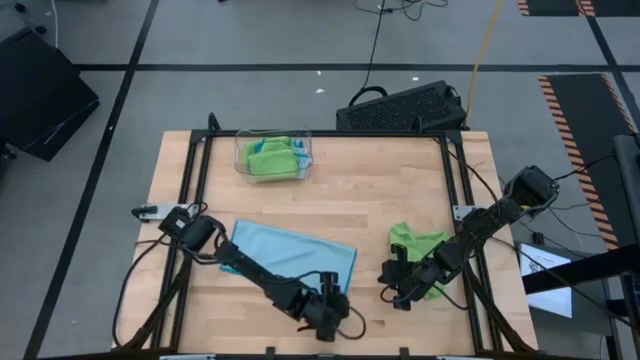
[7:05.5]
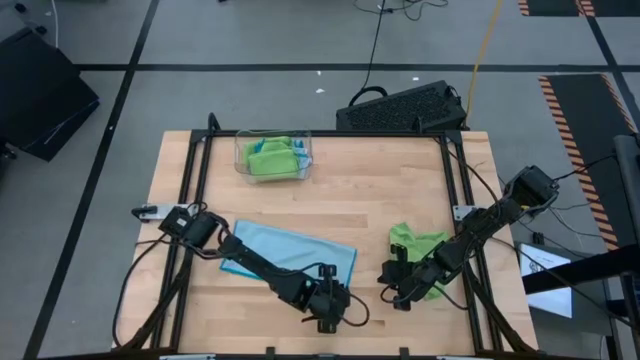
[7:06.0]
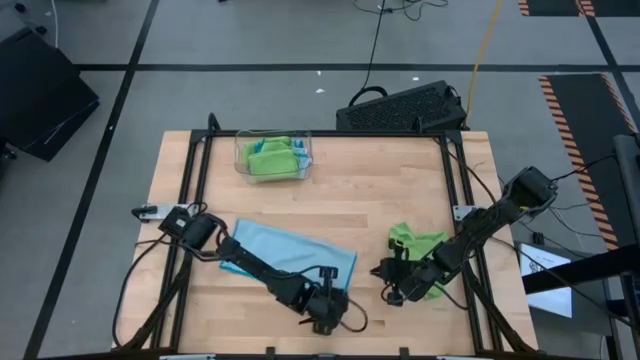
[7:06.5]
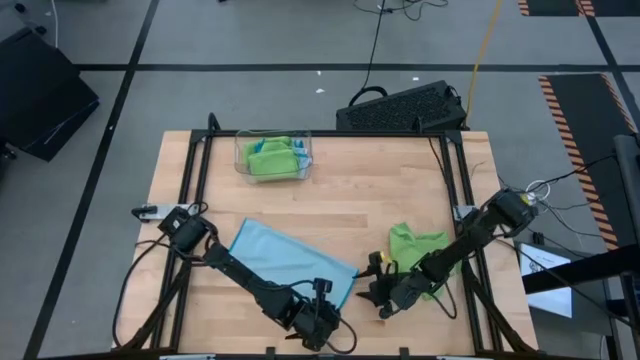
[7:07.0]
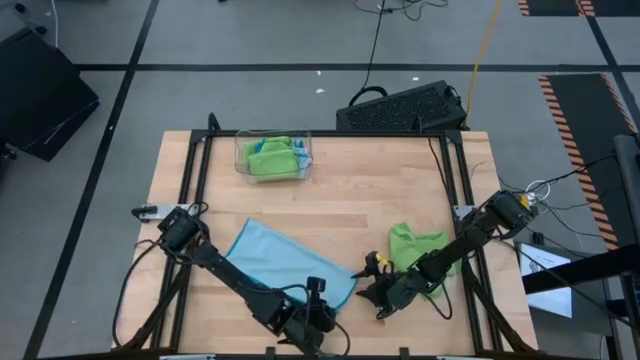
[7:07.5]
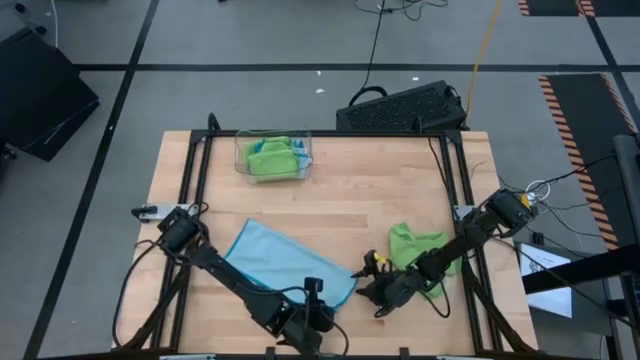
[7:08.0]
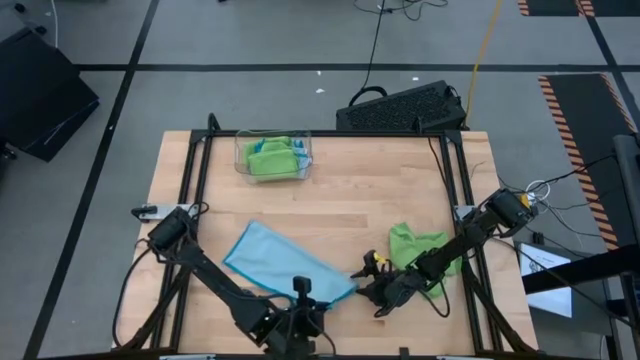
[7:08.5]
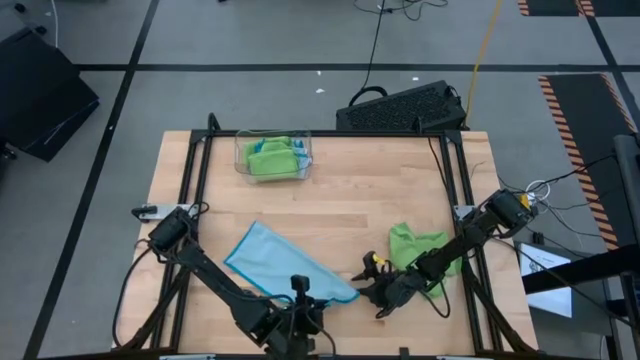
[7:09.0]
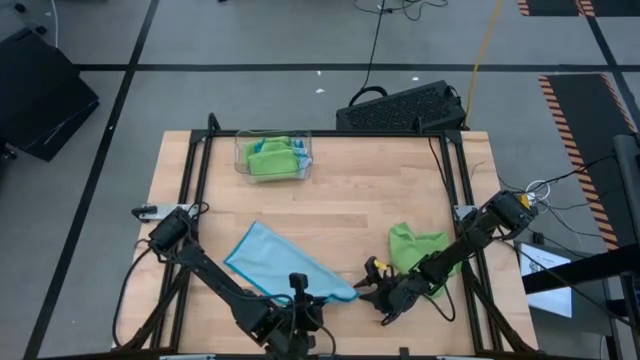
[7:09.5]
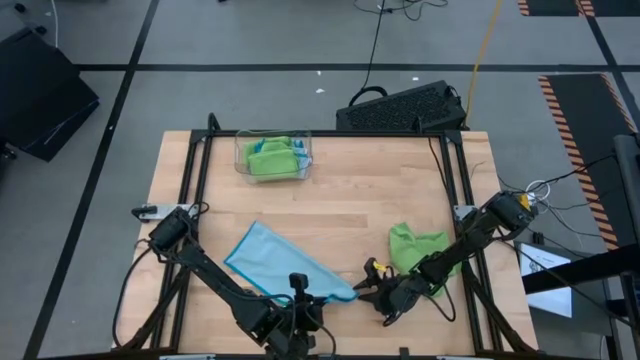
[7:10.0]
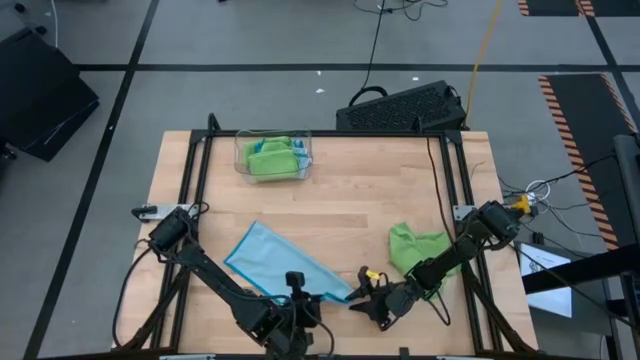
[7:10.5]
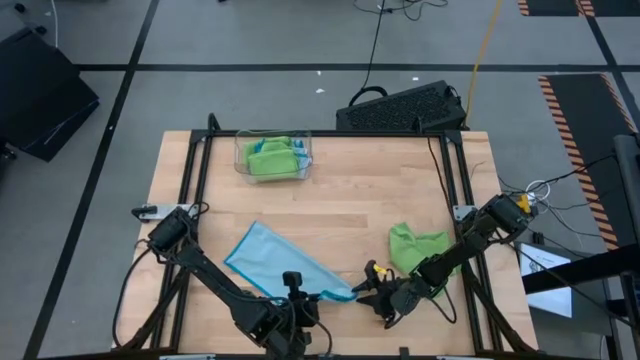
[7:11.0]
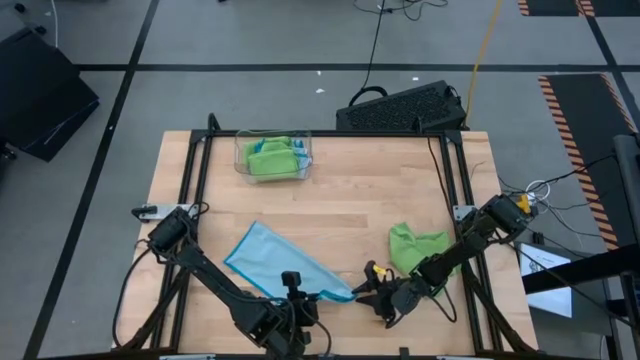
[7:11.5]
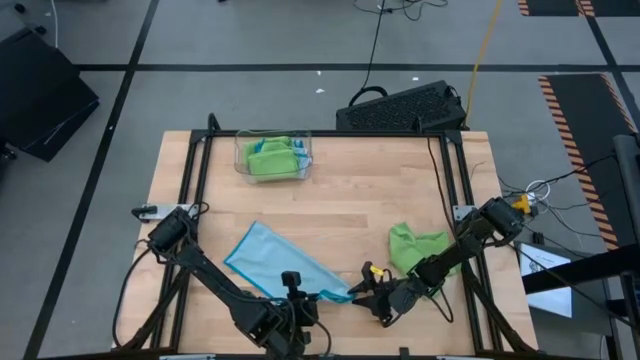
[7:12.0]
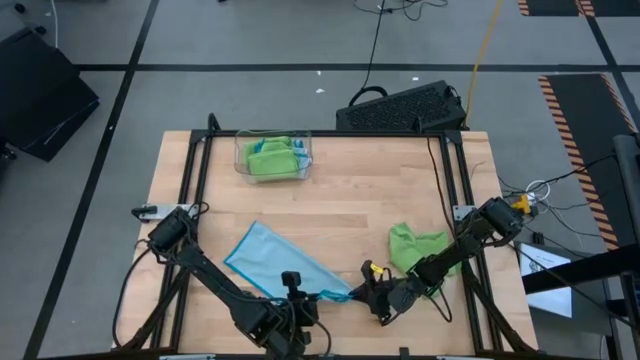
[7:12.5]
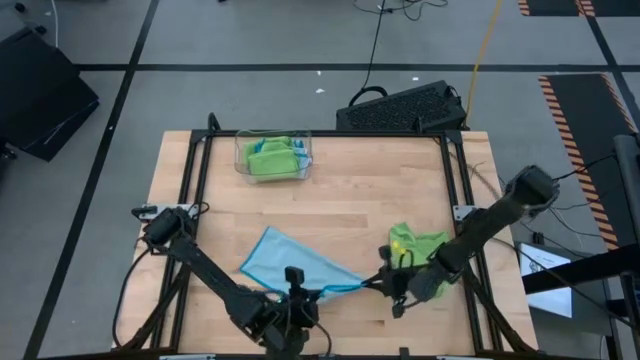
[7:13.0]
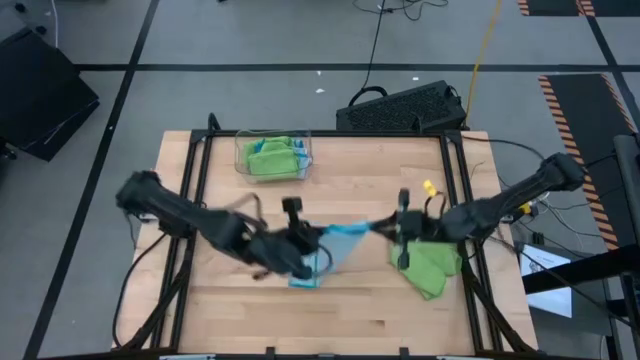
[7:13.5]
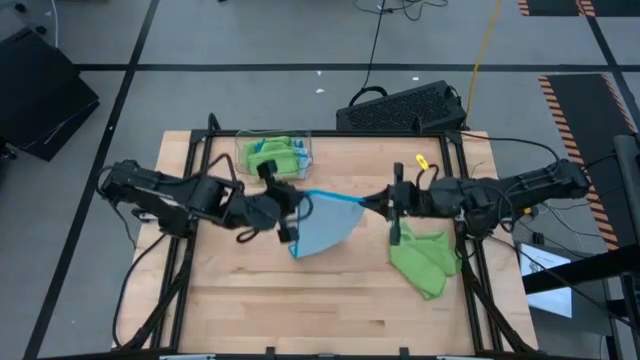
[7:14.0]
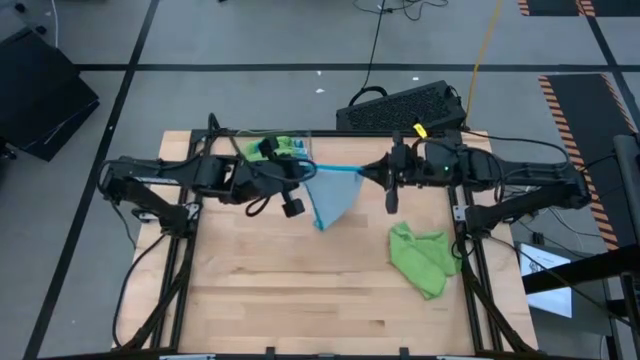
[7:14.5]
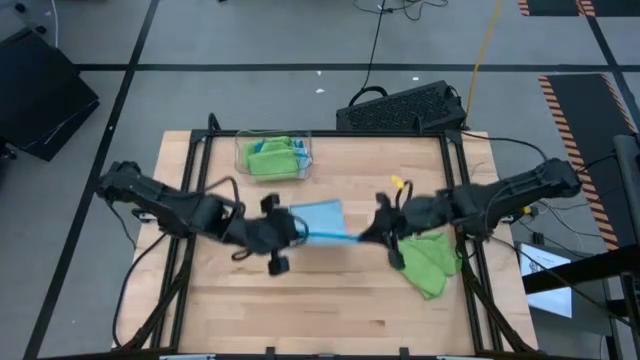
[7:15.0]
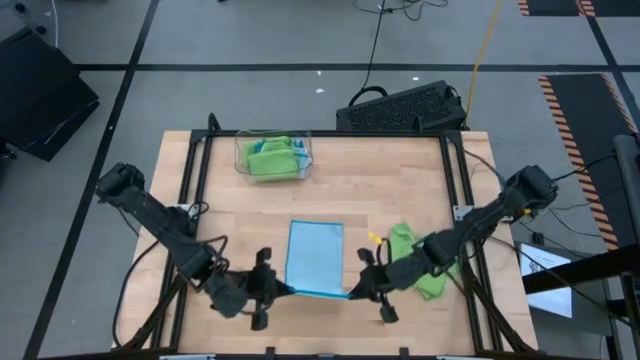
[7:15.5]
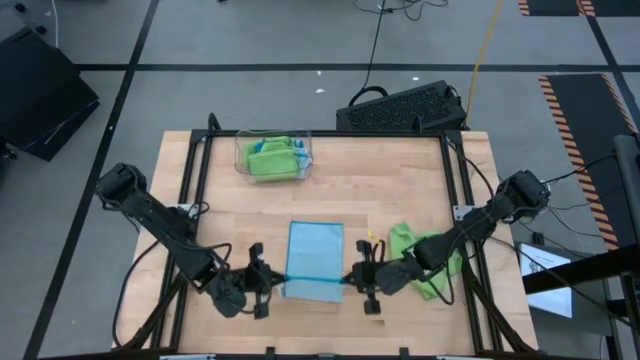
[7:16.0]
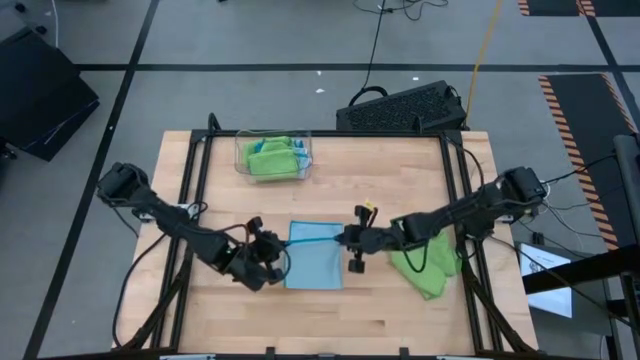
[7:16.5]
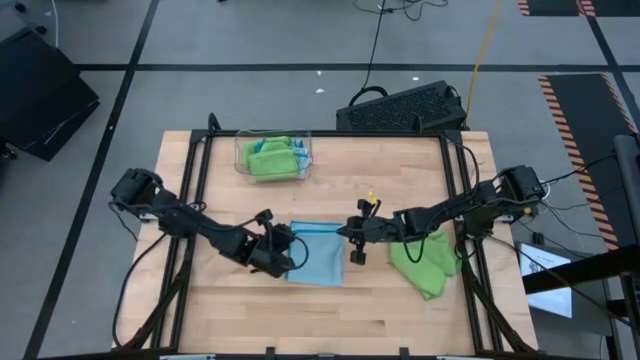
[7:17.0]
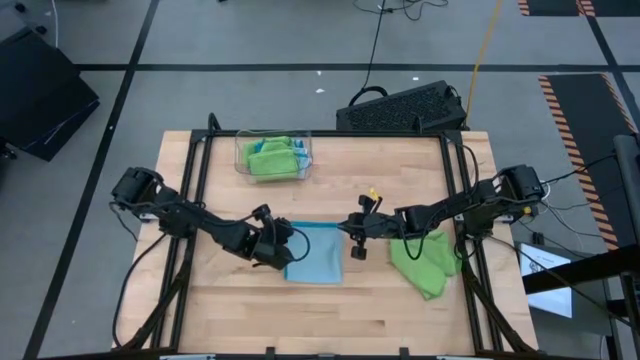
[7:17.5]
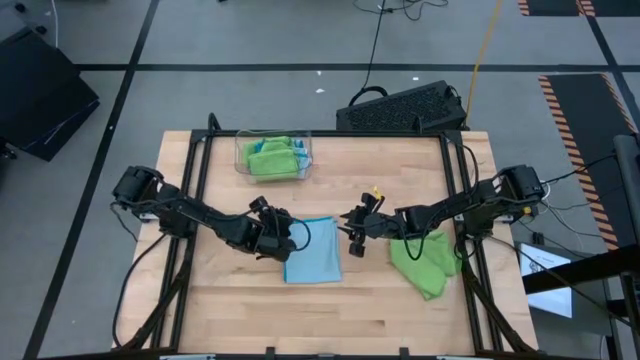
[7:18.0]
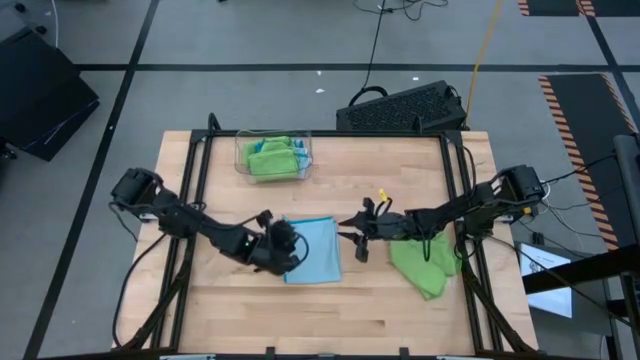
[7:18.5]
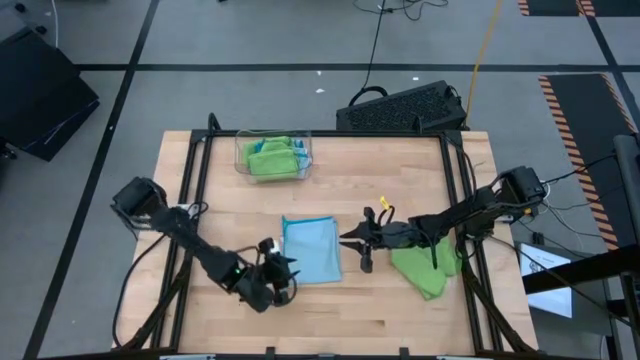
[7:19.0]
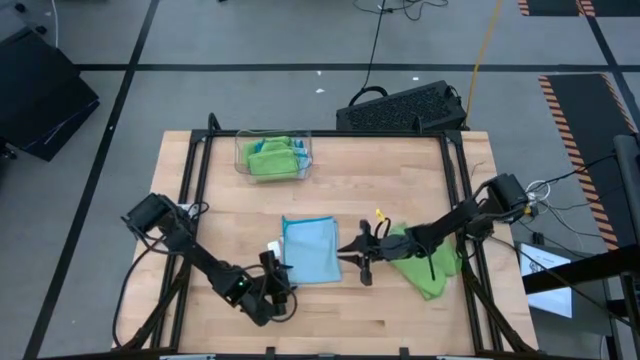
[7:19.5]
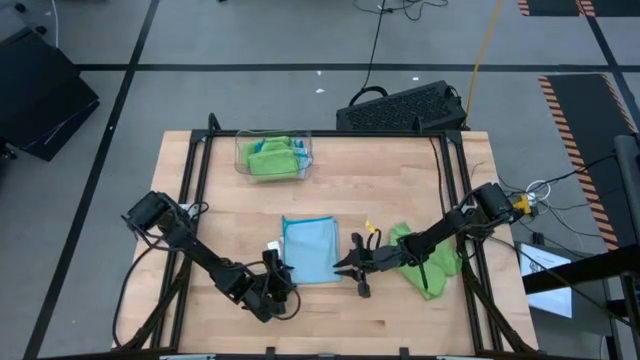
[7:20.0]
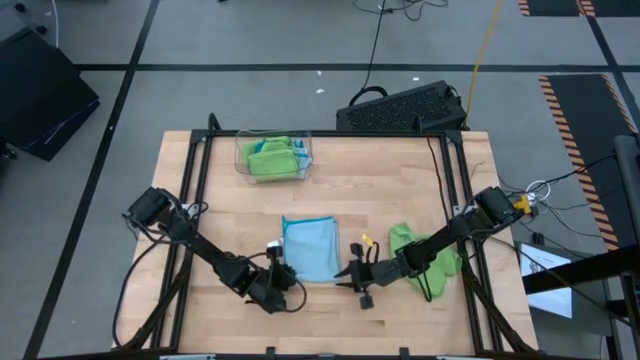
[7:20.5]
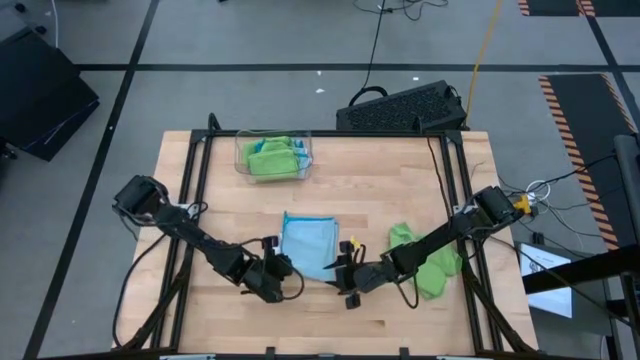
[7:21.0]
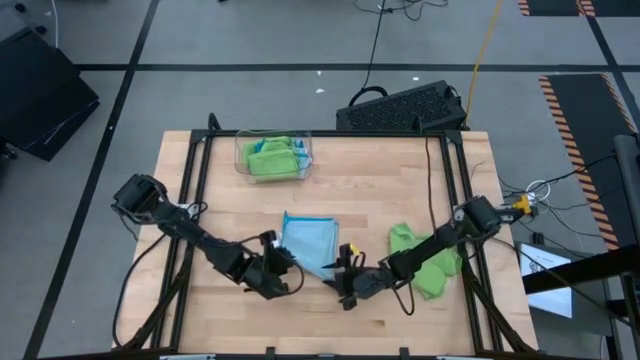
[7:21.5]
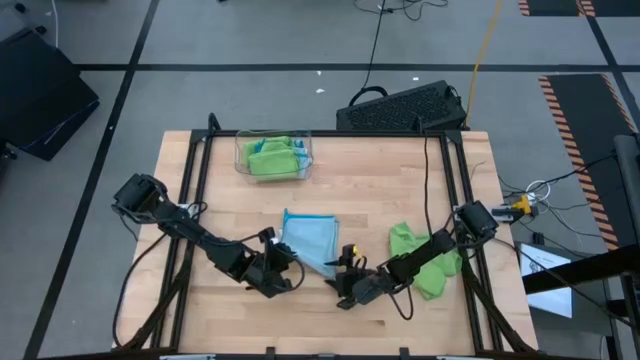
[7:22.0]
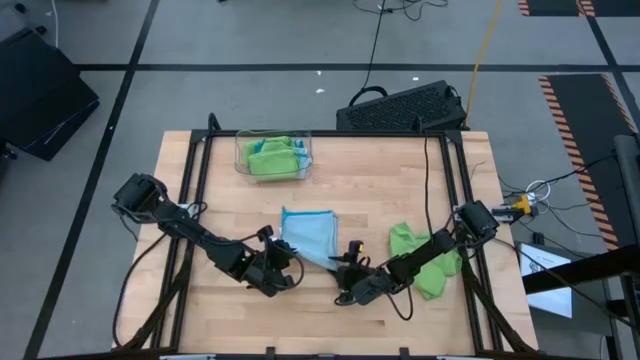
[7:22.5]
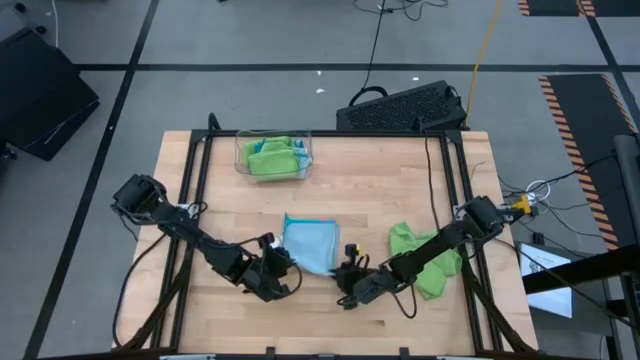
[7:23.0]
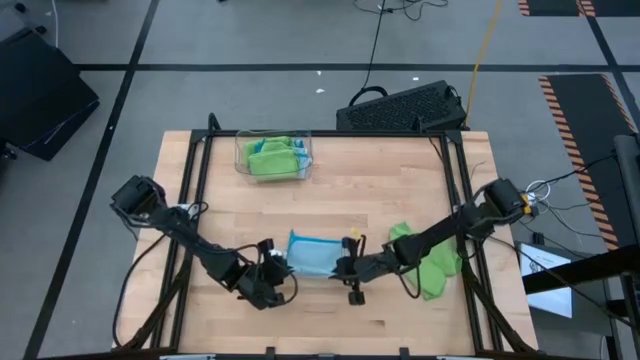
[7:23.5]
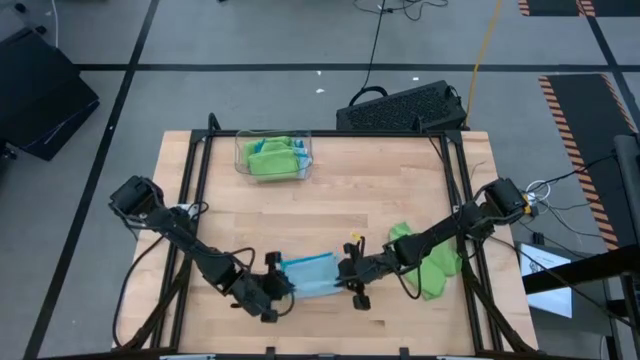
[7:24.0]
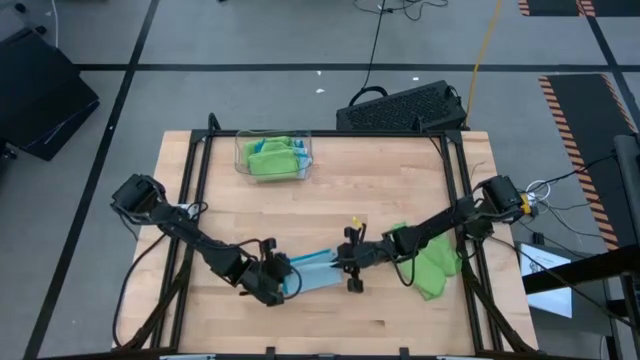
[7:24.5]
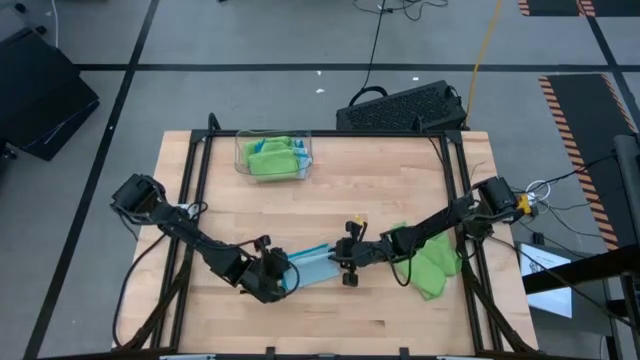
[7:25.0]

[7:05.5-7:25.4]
Task: Fold microfiber towels
Fold the blue microfiber cloth

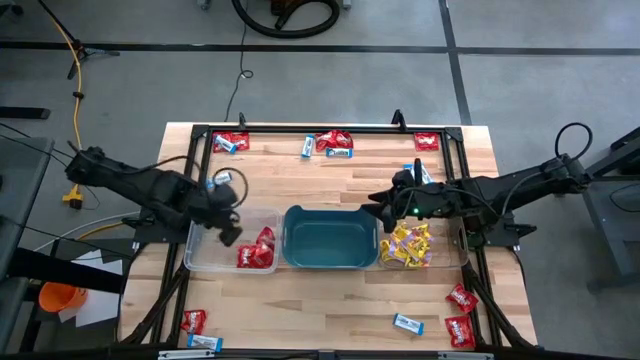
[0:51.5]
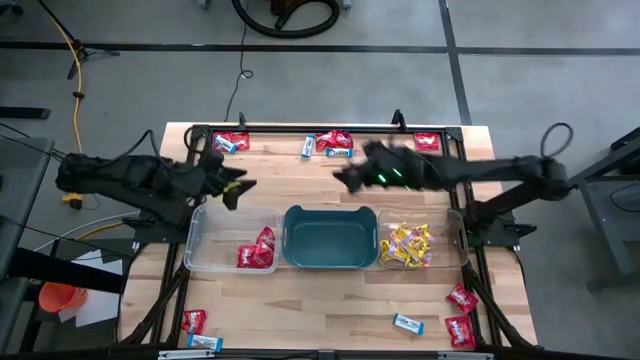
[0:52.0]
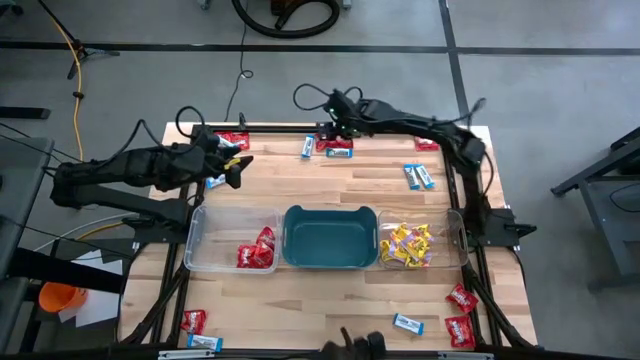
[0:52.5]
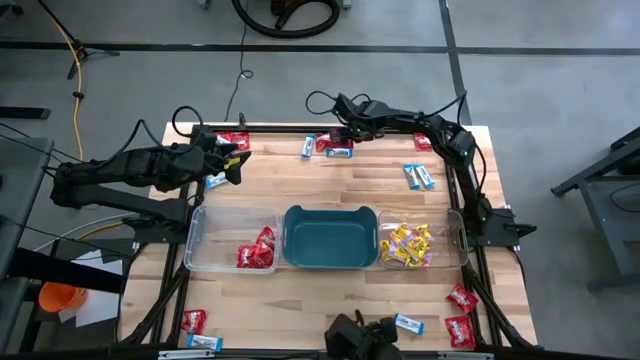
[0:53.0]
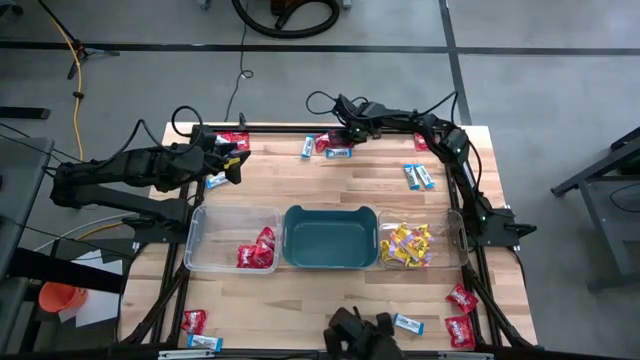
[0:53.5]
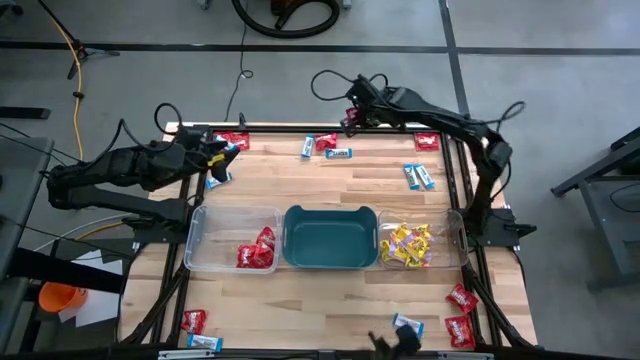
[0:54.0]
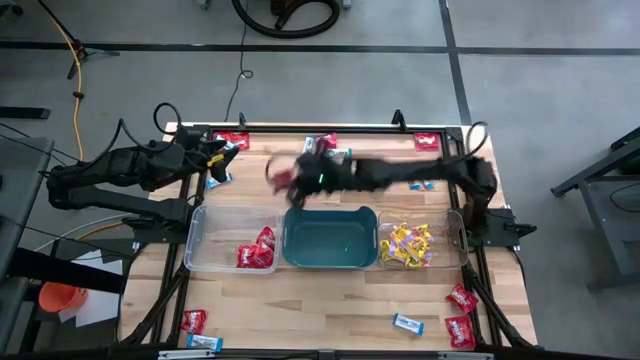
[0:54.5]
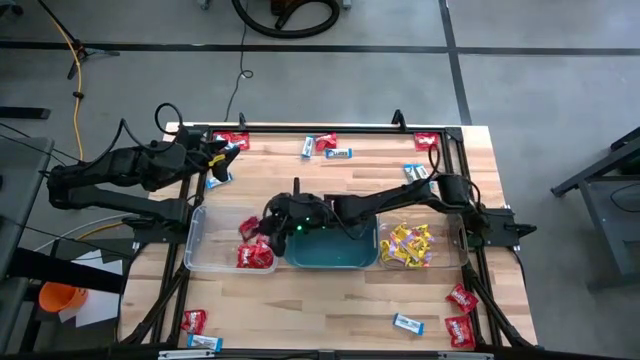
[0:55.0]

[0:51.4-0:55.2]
Task: Sort candy
Put the red candy into the left transparent bin
